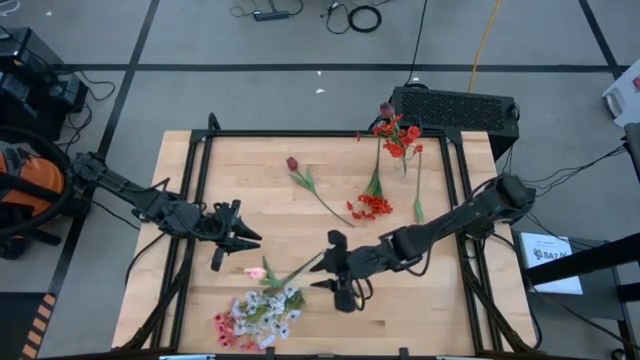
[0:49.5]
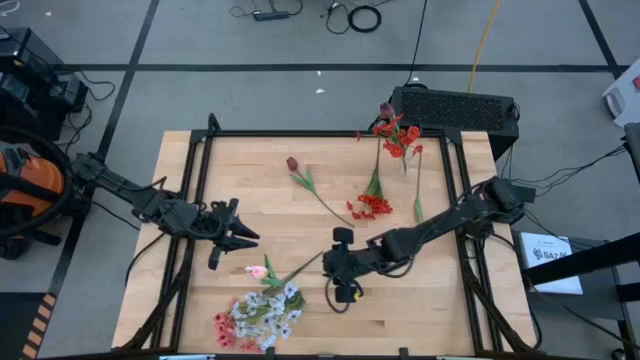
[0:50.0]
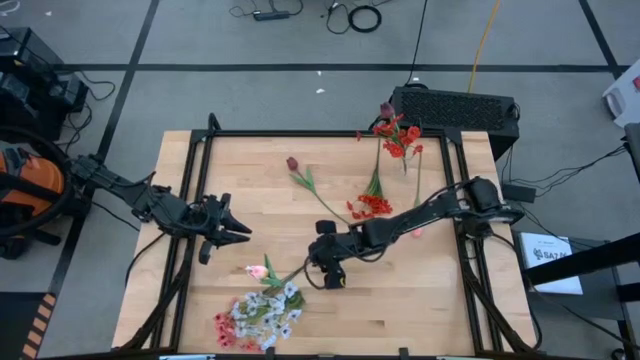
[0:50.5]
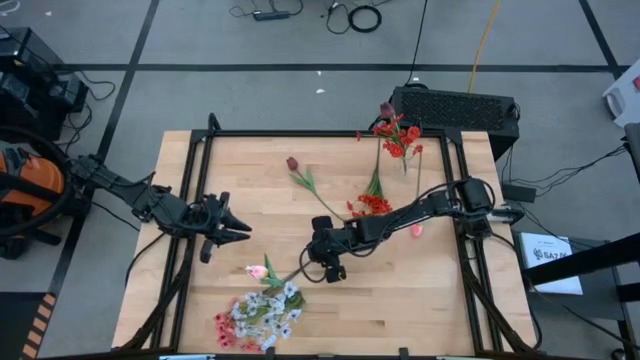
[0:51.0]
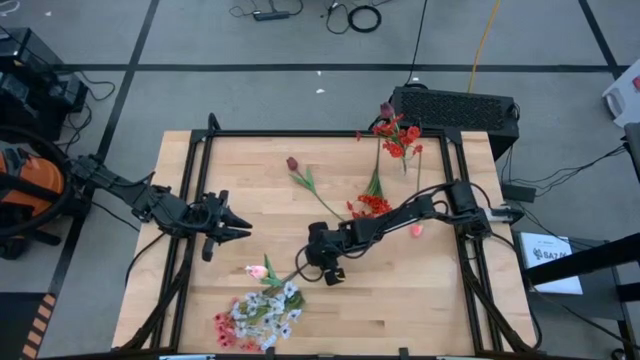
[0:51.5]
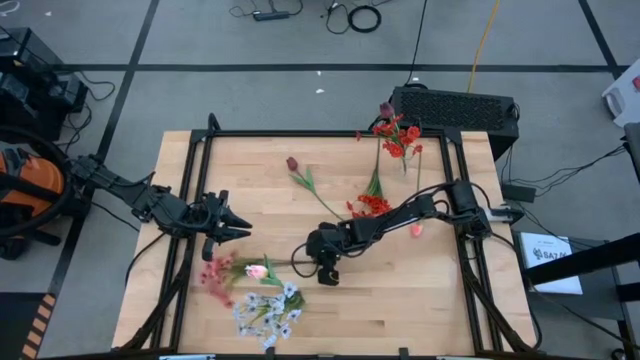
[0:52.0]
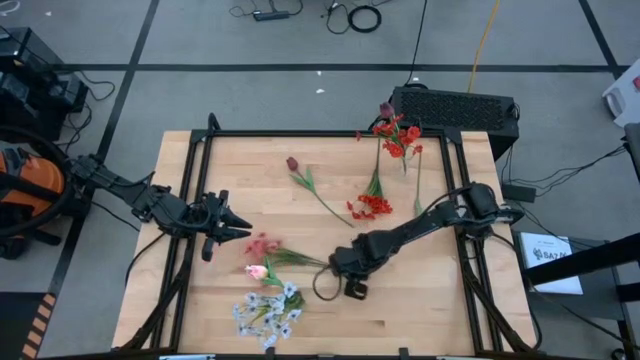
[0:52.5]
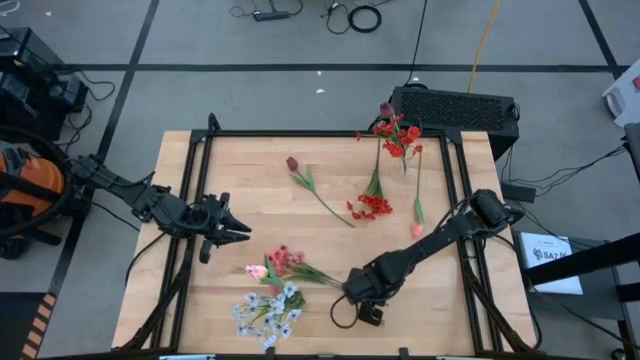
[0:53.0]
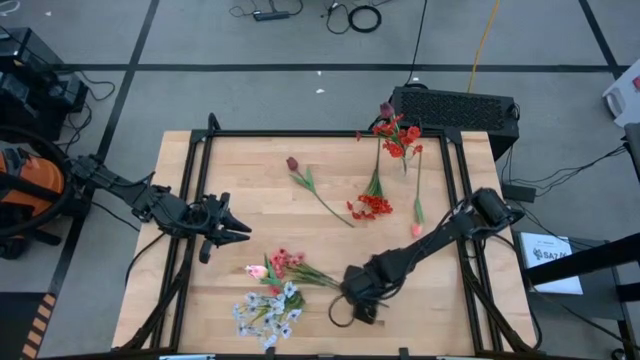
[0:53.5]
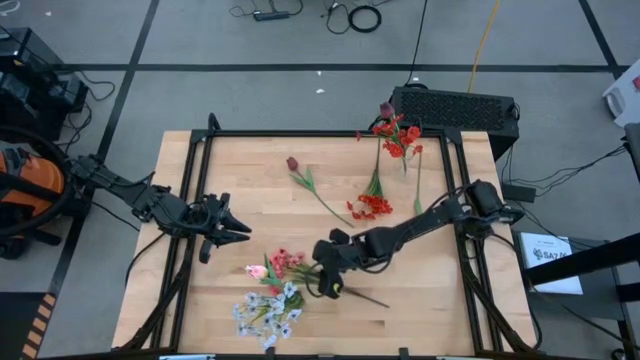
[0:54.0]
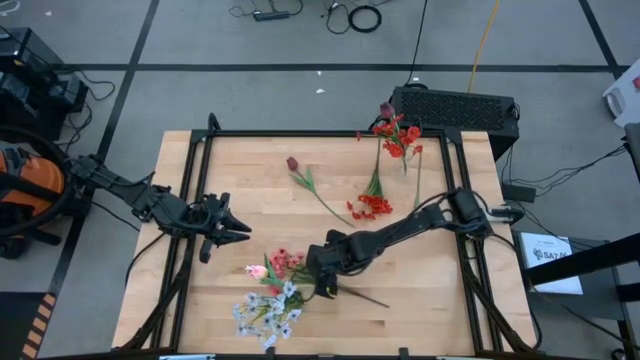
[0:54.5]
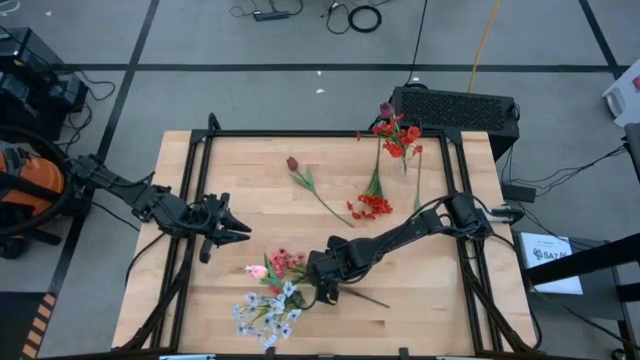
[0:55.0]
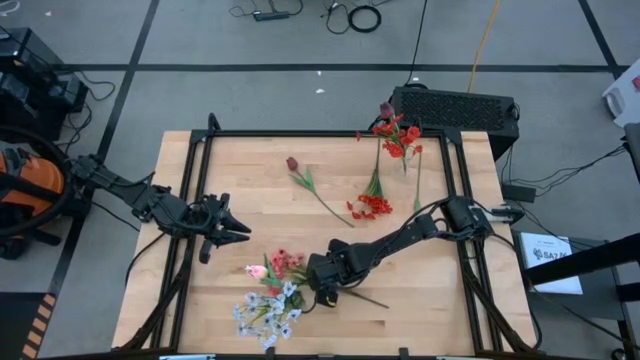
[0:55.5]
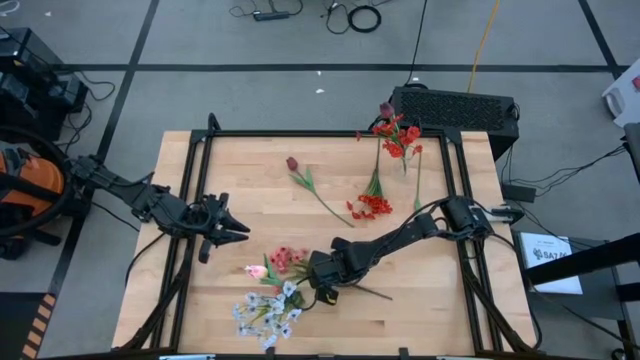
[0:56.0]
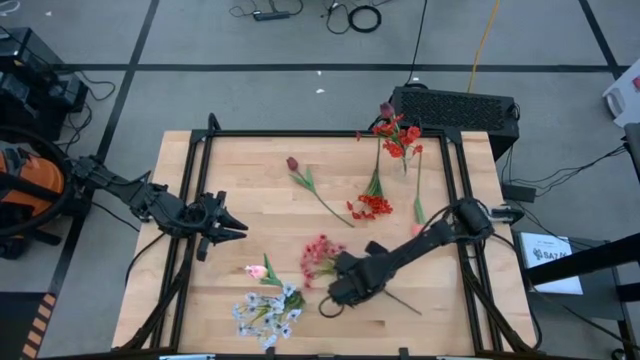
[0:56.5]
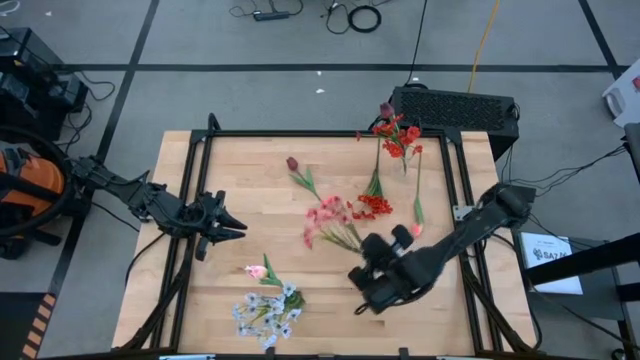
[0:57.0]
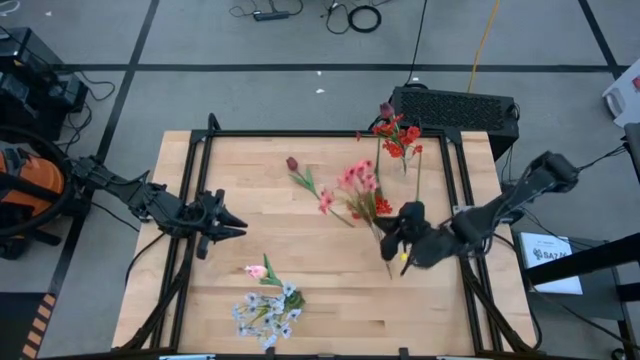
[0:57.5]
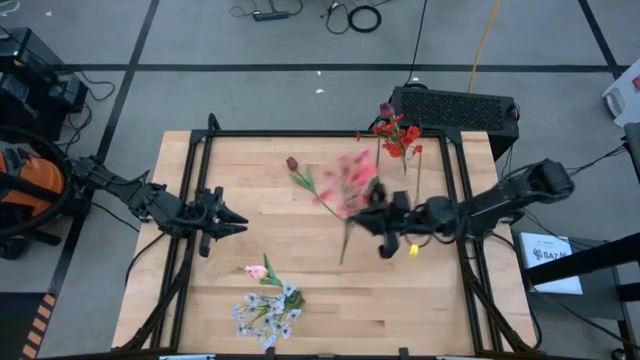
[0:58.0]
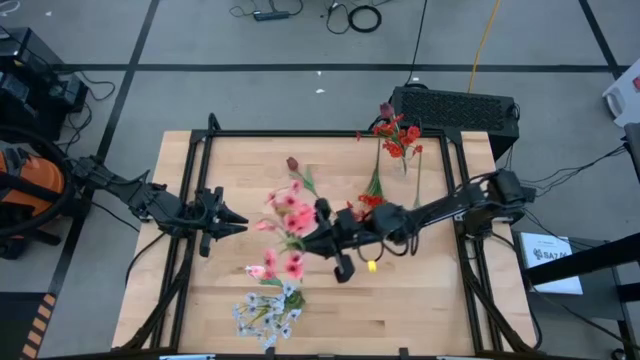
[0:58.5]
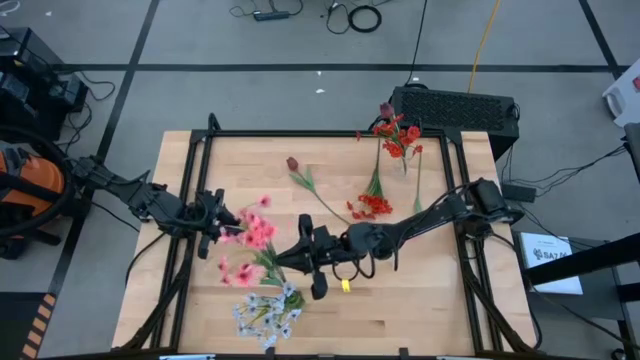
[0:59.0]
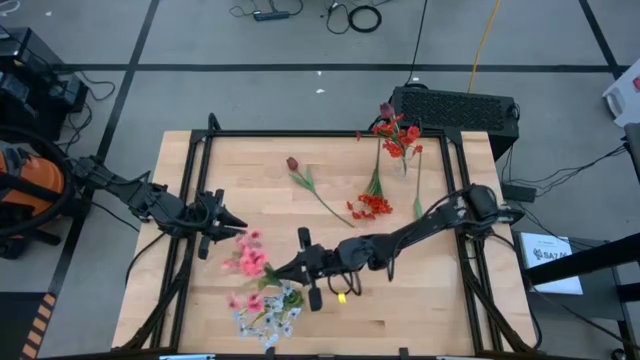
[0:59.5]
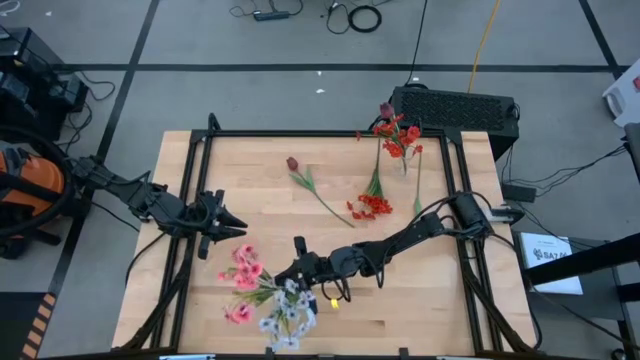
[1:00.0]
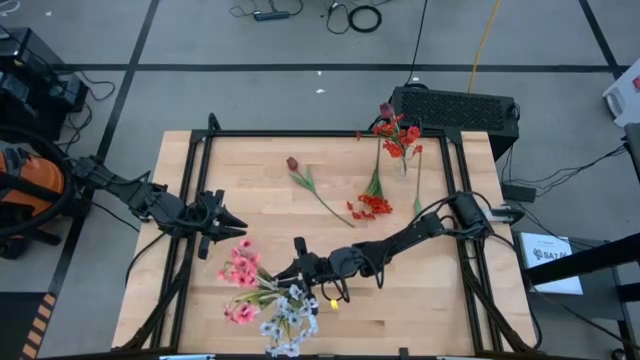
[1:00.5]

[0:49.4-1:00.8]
Task: Sort flowers into vase by color
Put the pink flowers into the green vase

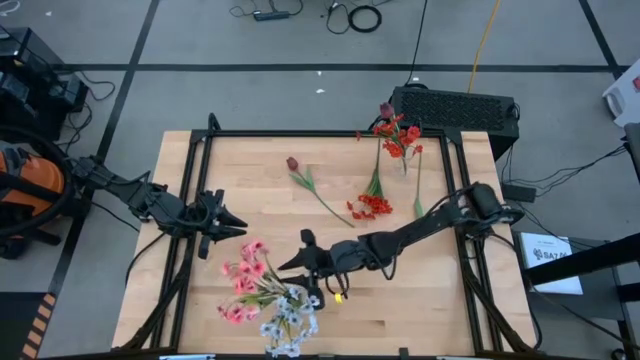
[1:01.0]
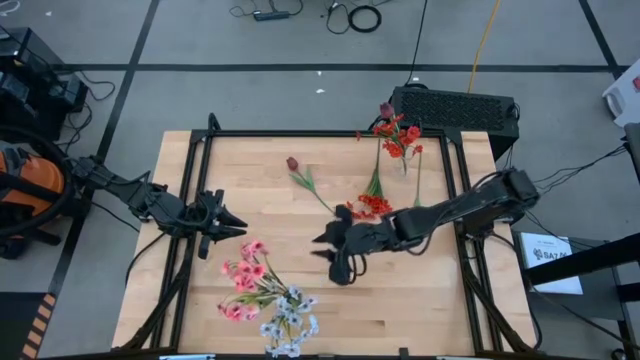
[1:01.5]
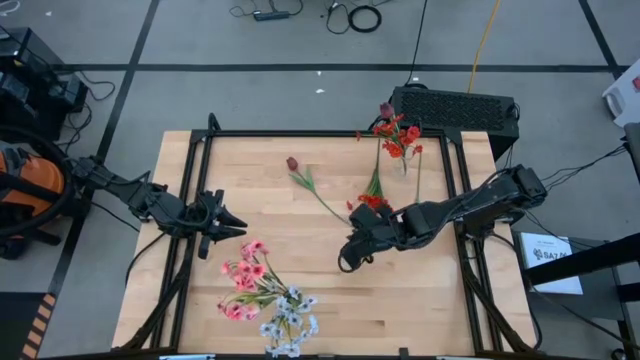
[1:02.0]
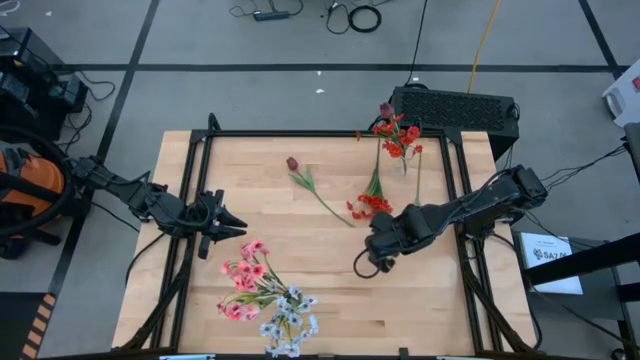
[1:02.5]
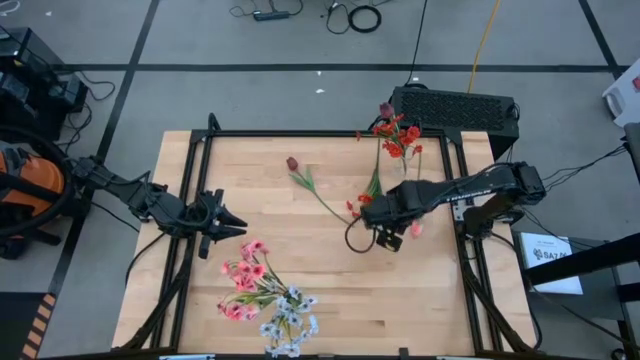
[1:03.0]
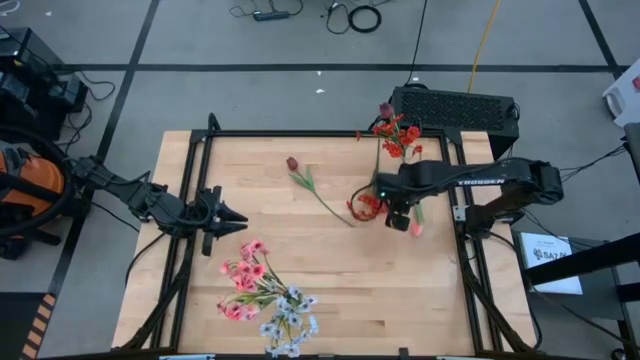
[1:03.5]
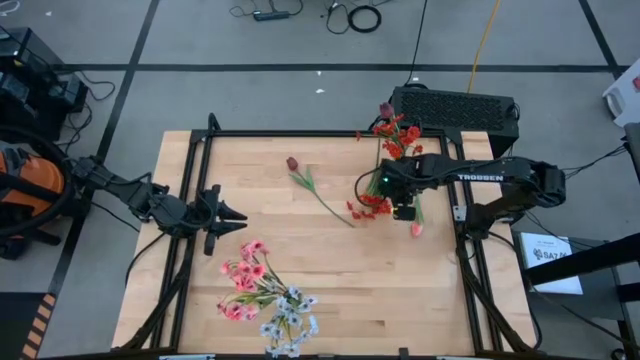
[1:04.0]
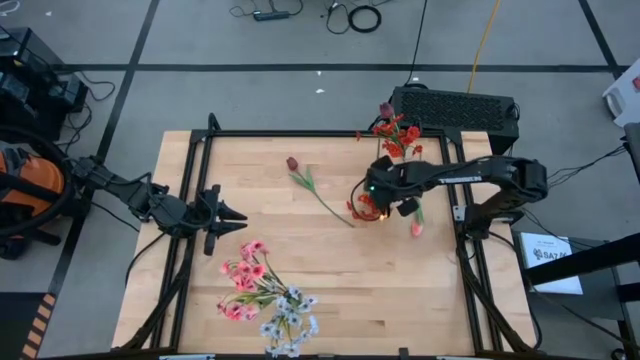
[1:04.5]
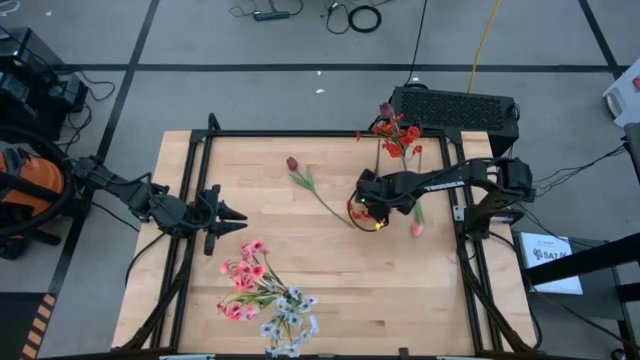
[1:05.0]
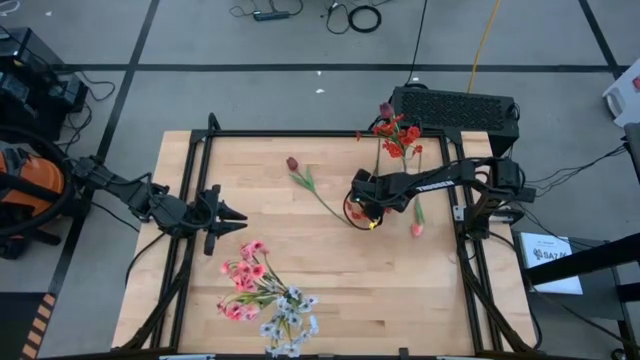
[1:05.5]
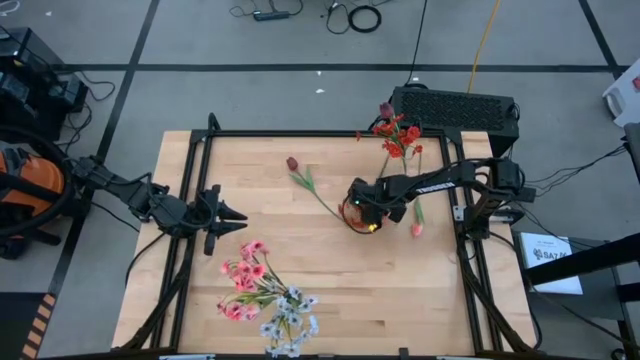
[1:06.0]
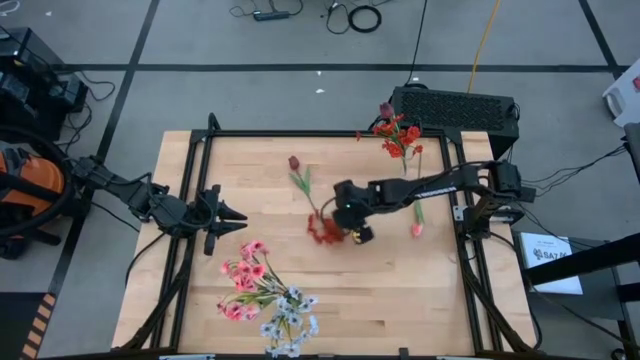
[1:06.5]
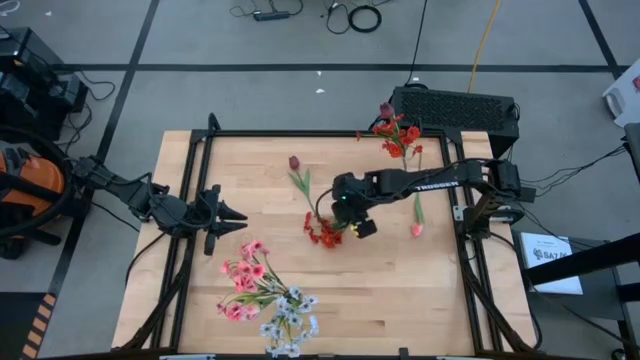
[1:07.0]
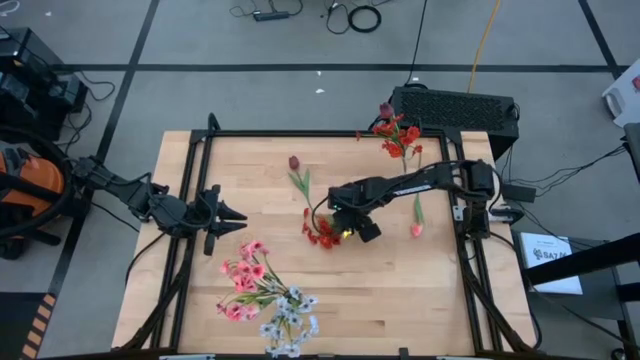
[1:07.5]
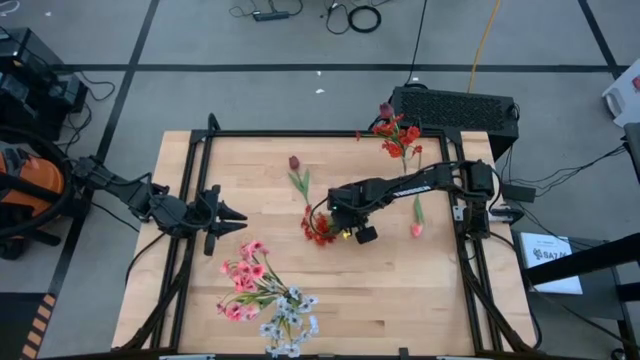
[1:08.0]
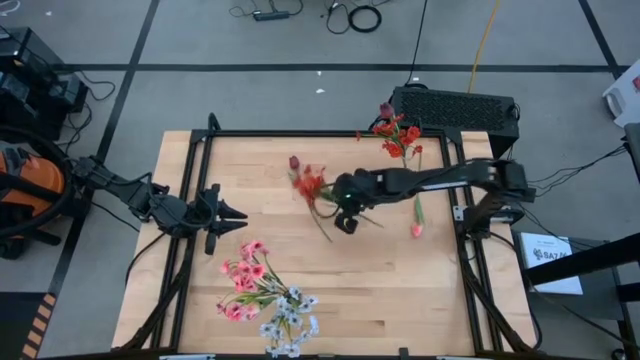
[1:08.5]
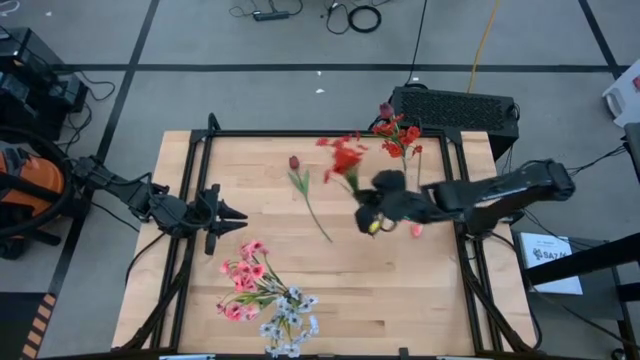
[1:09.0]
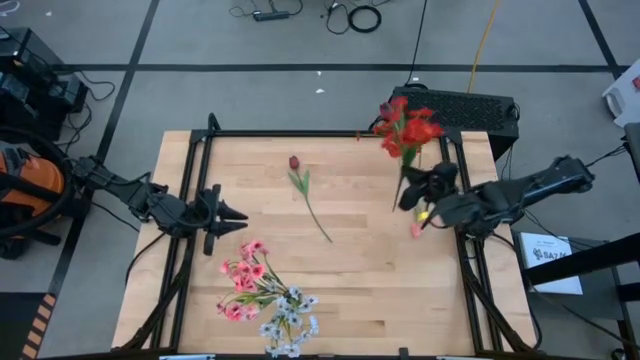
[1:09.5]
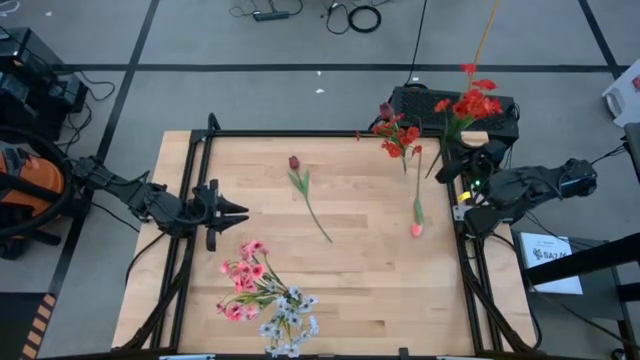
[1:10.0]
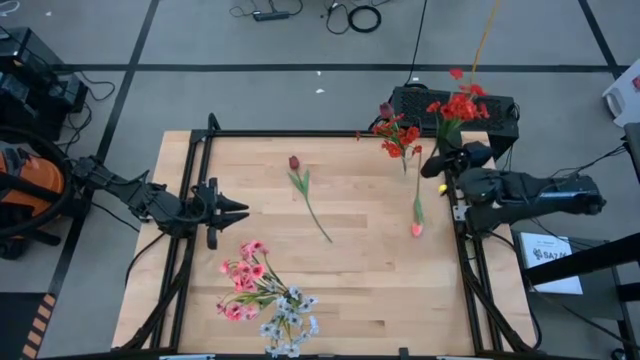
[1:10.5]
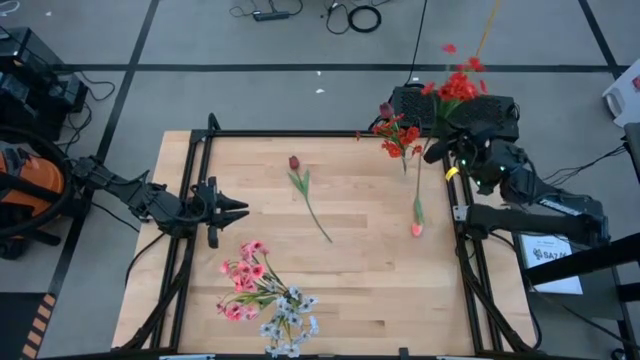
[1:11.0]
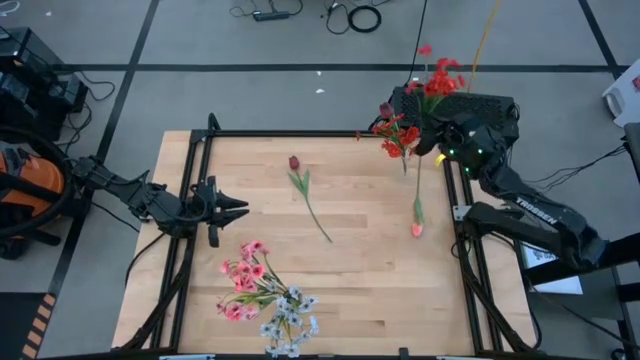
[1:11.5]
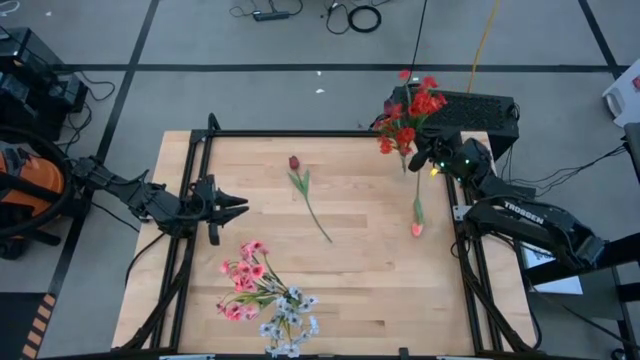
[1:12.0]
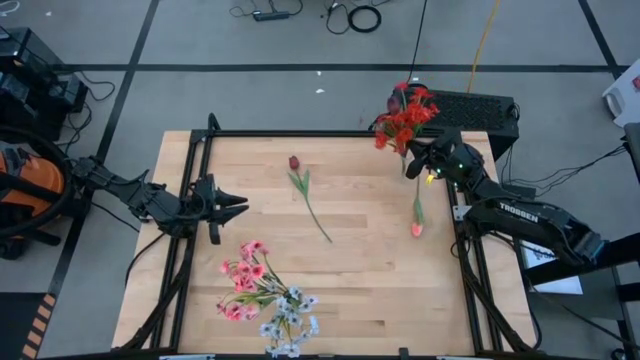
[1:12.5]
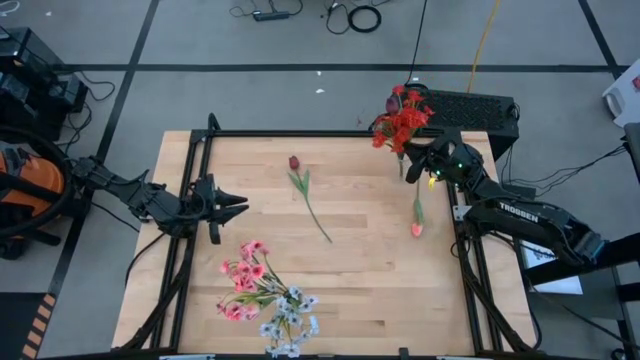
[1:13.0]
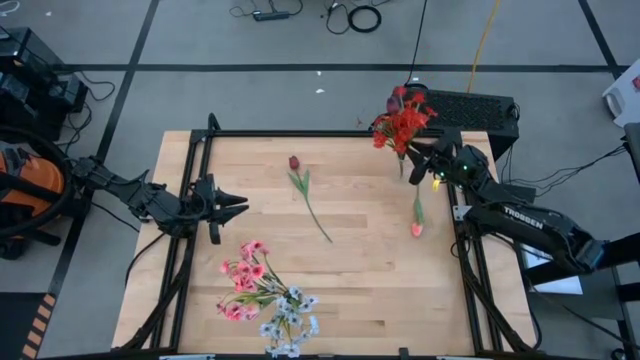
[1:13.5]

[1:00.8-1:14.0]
Put the orange flower into the transparent vase
